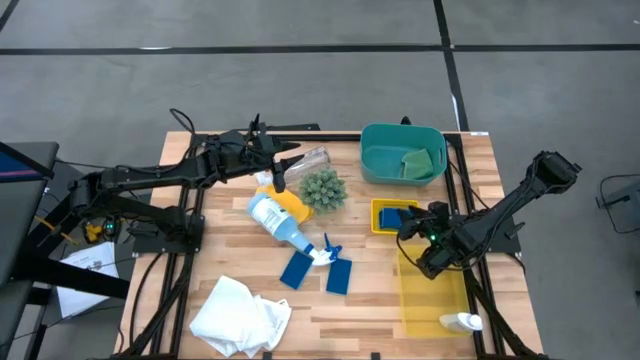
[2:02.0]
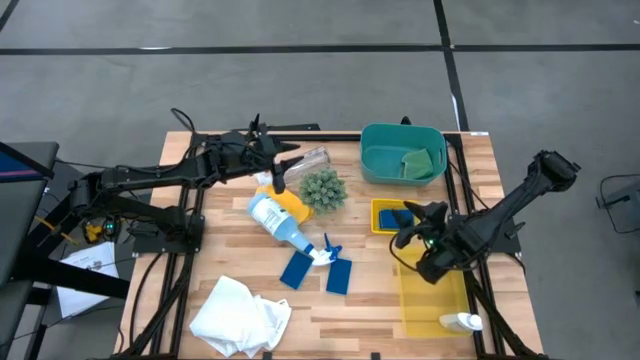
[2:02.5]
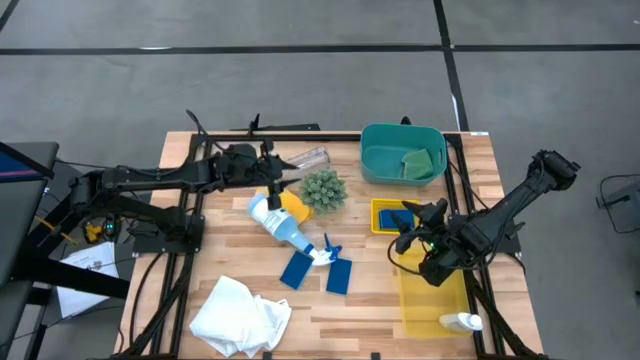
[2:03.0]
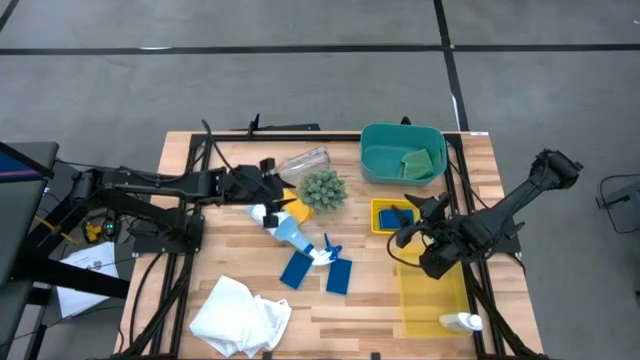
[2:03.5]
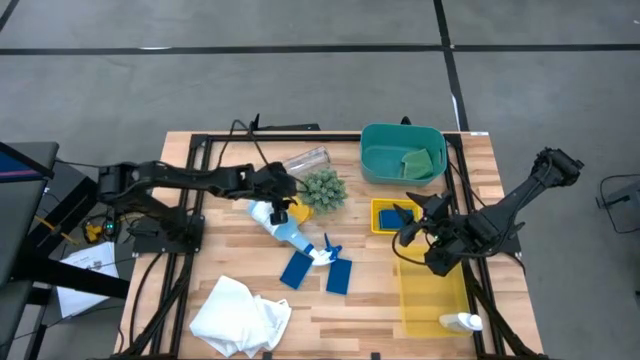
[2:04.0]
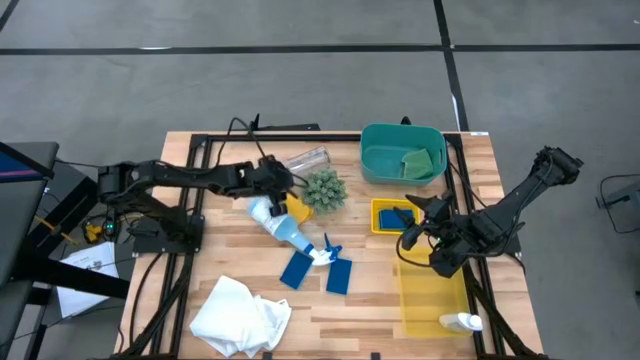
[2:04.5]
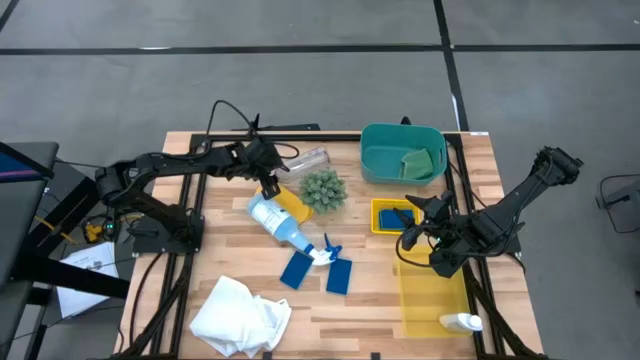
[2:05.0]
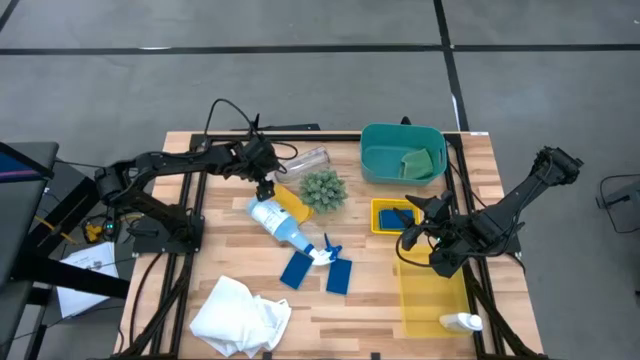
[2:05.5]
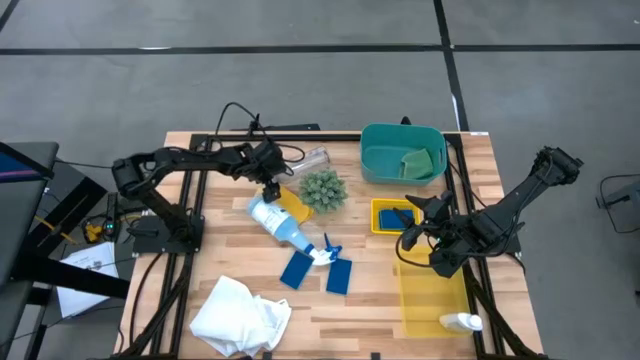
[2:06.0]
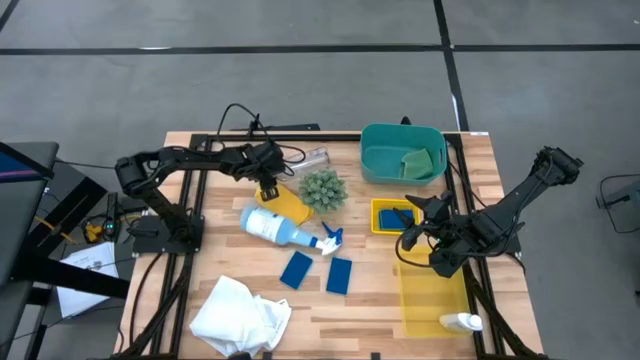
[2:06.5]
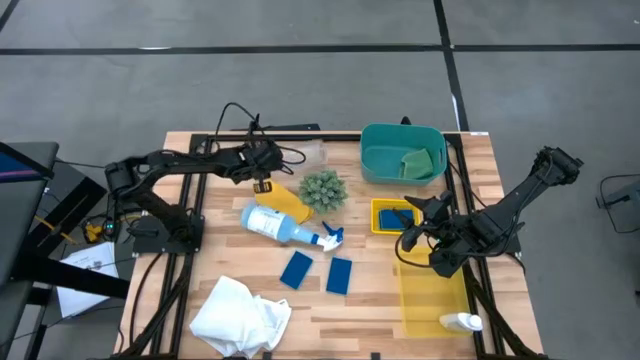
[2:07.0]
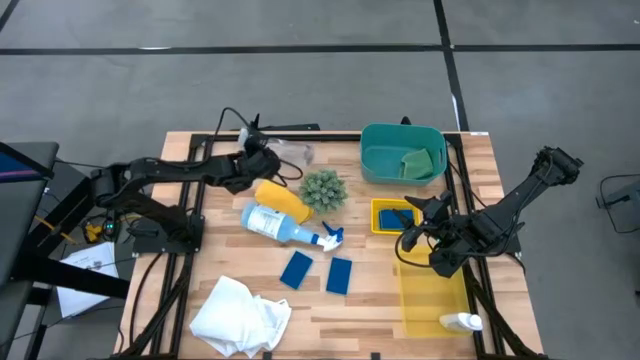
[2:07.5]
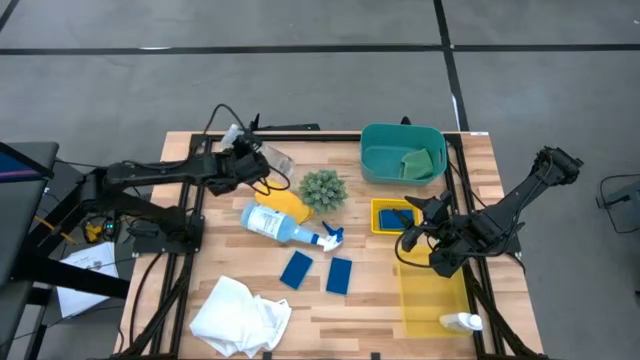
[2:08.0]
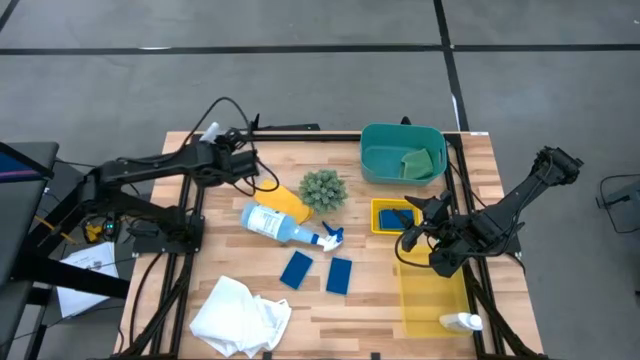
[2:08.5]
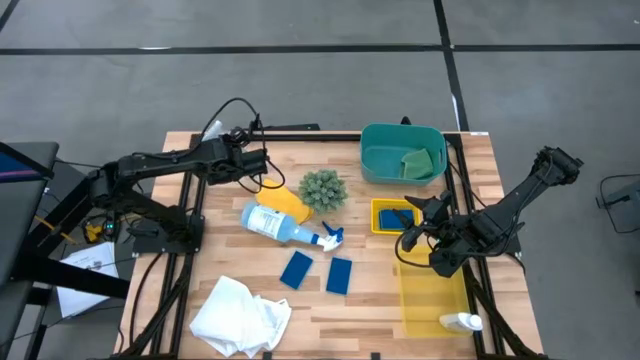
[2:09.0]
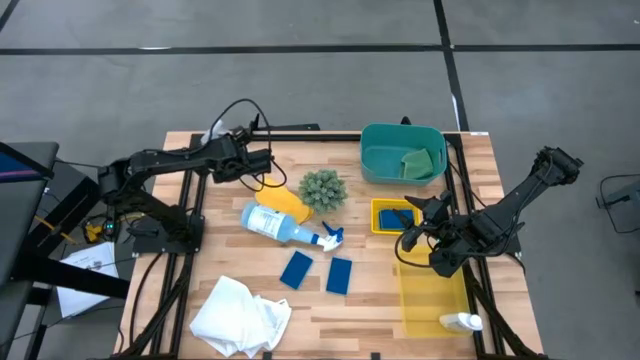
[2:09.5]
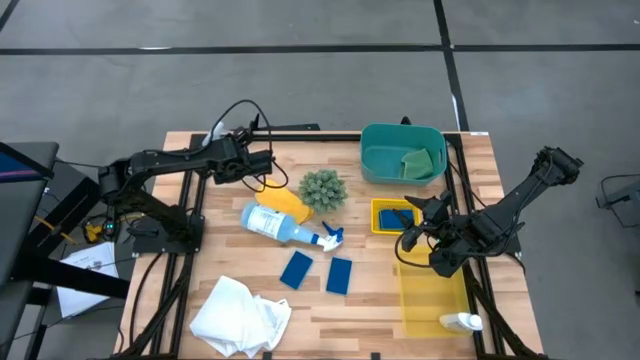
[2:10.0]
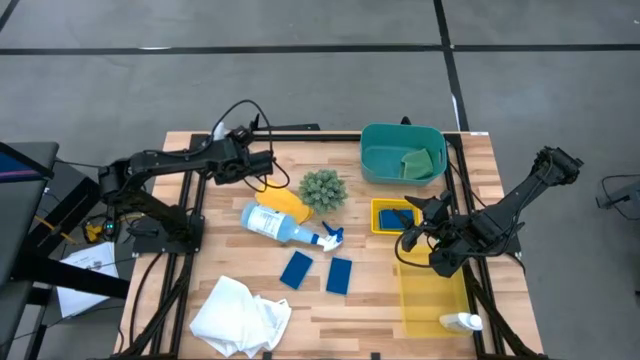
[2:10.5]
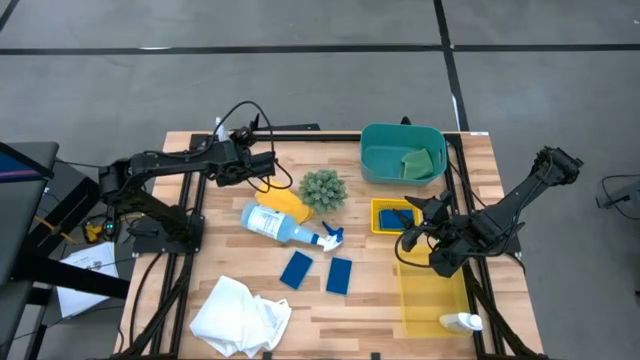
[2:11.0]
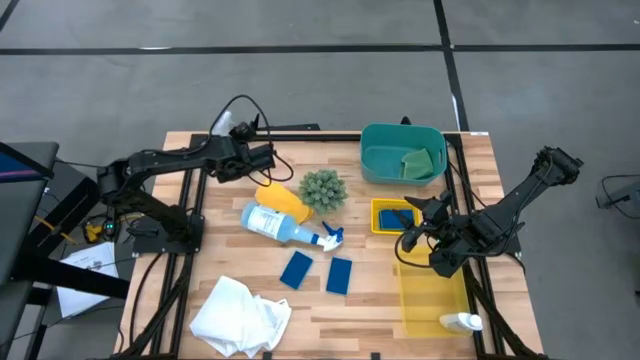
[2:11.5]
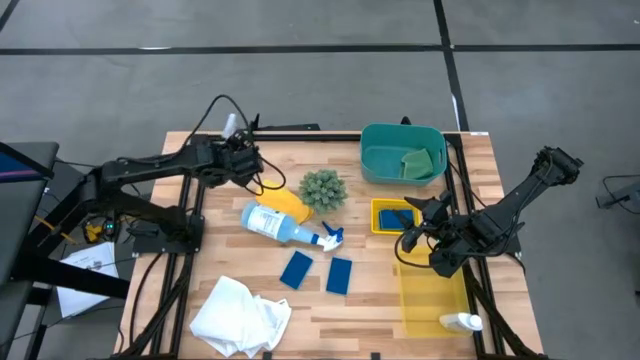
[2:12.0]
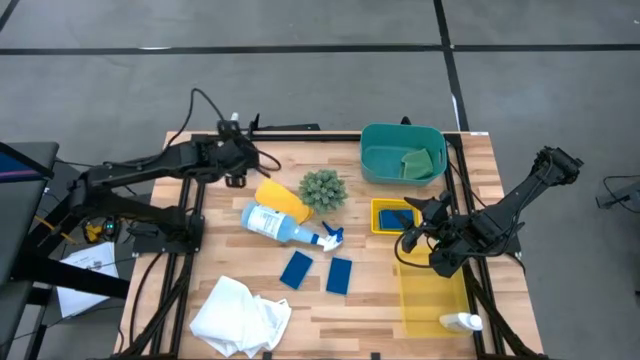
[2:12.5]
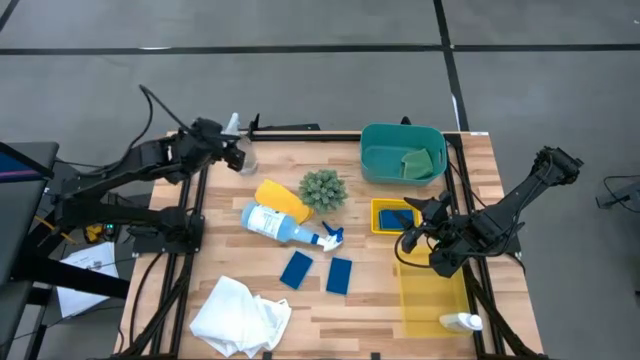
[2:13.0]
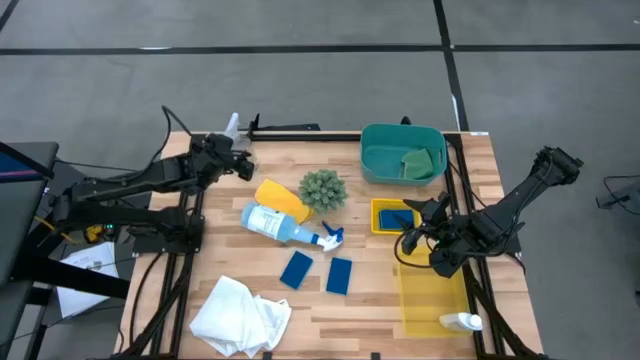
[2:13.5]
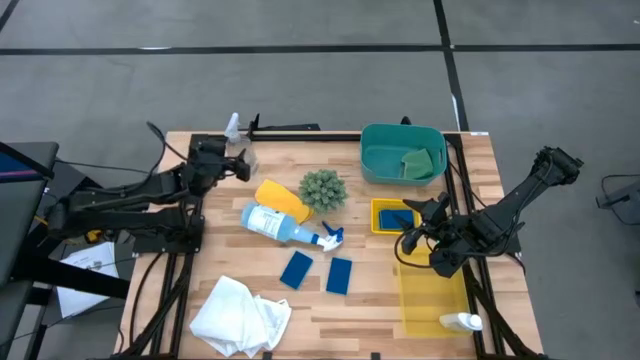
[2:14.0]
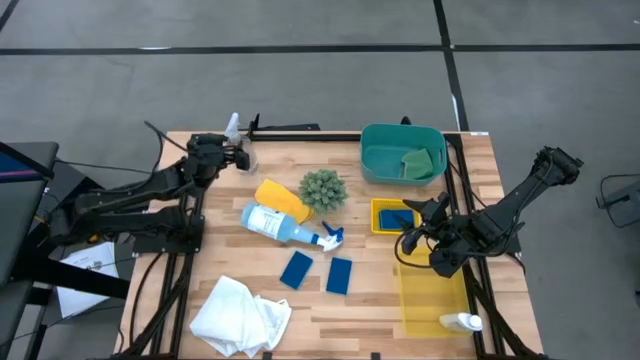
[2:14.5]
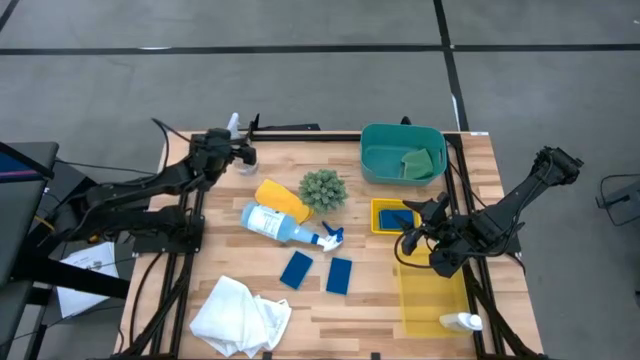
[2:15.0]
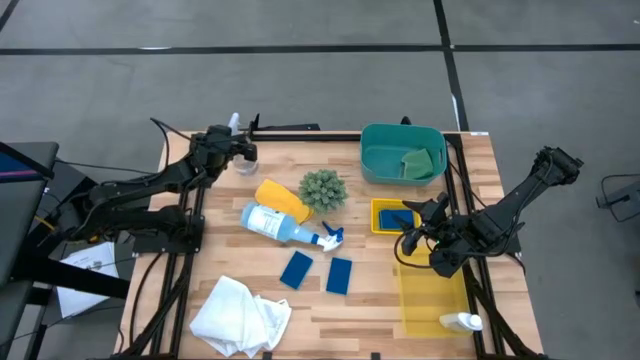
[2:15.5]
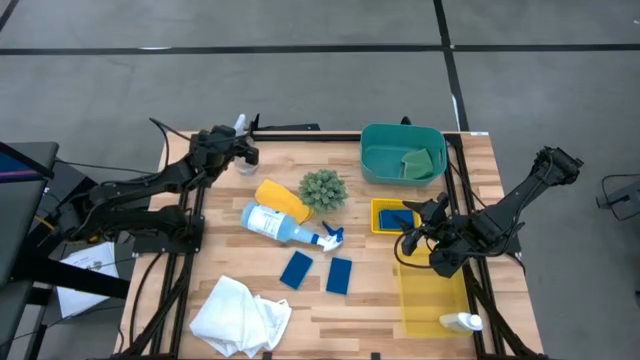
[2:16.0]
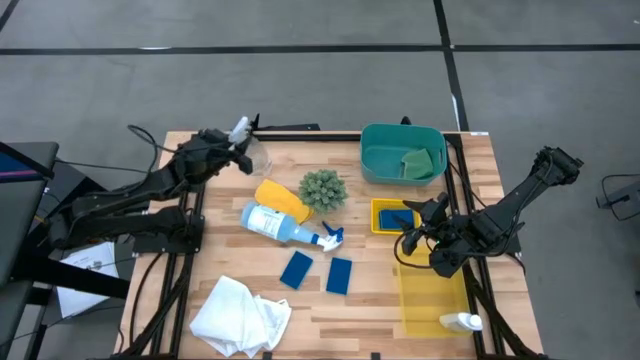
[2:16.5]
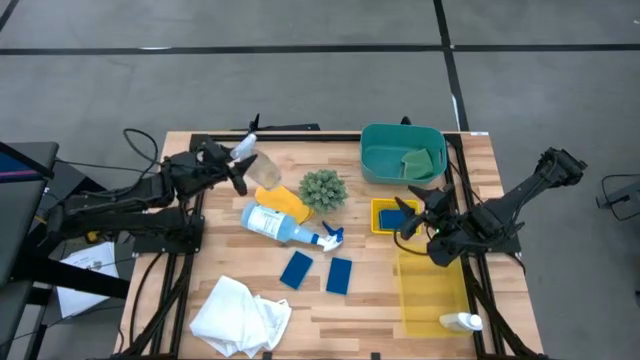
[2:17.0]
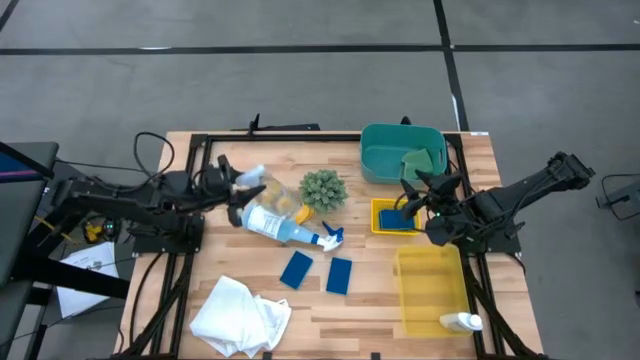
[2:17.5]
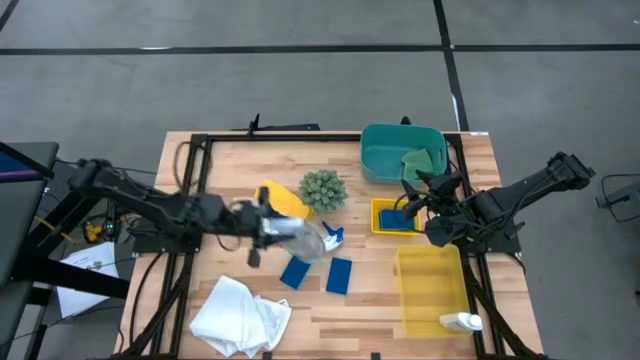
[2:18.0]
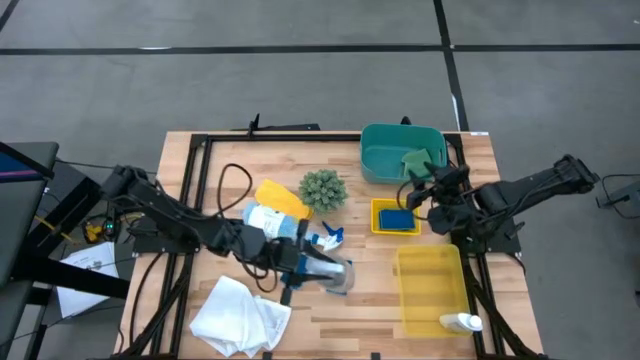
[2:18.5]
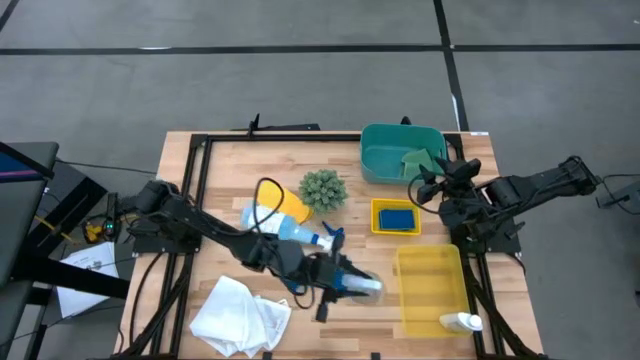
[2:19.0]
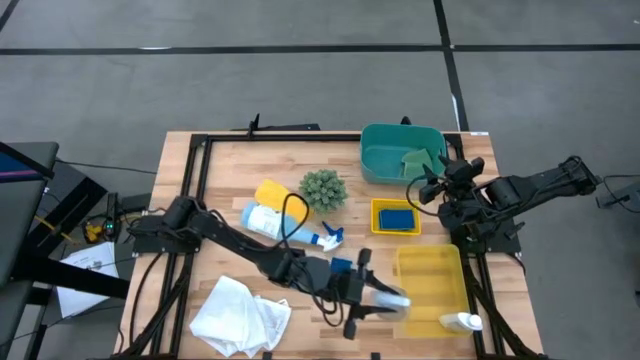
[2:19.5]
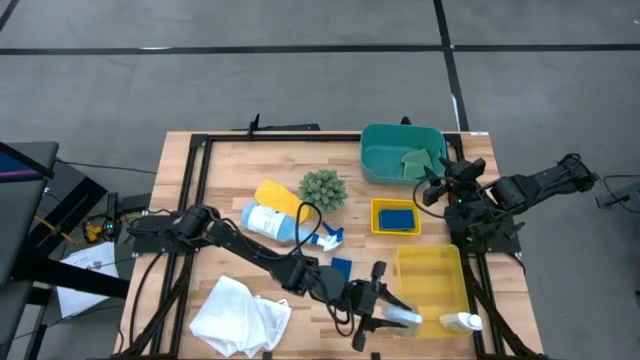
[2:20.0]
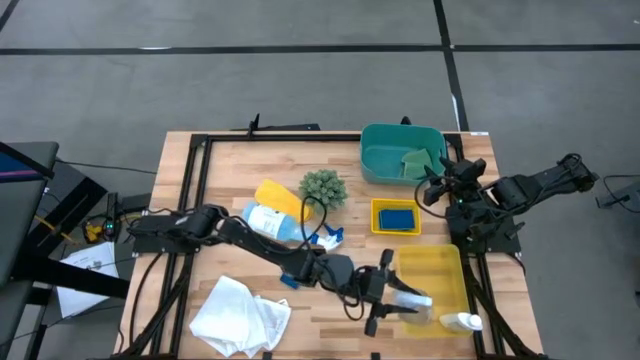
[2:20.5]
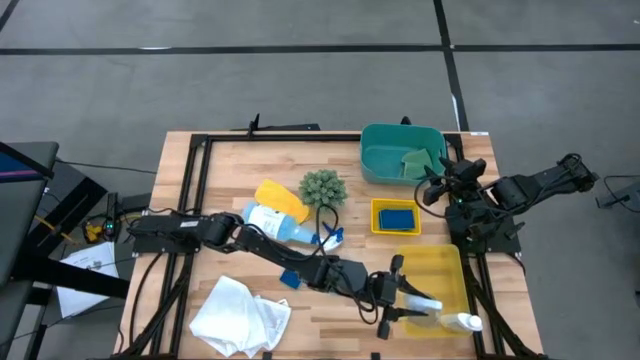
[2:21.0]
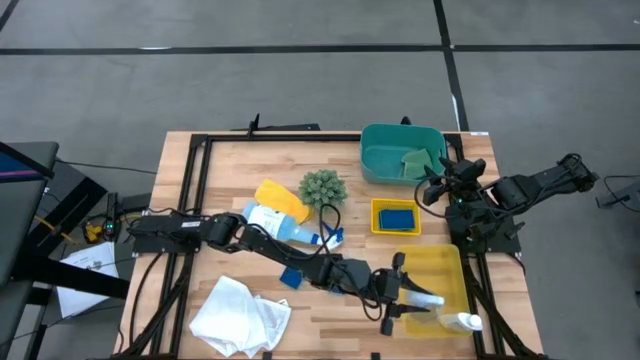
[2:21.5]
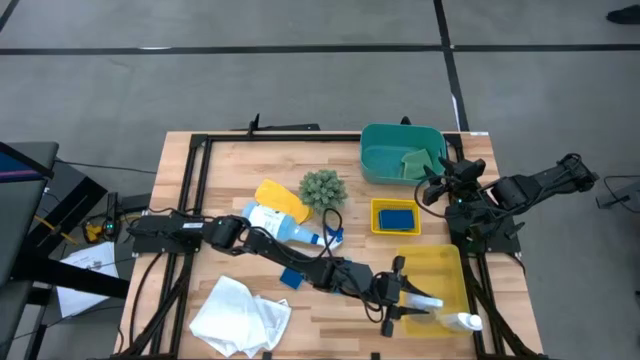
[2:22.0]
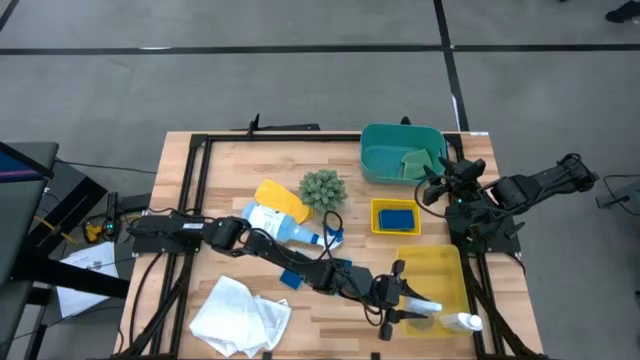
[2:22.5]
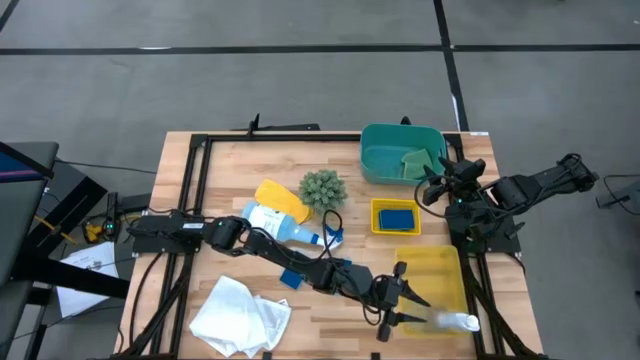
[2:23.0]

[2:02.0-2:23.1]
Task: Pick & Place Kitchen Items
Put the transparent bottle into the bottom yellow bin
